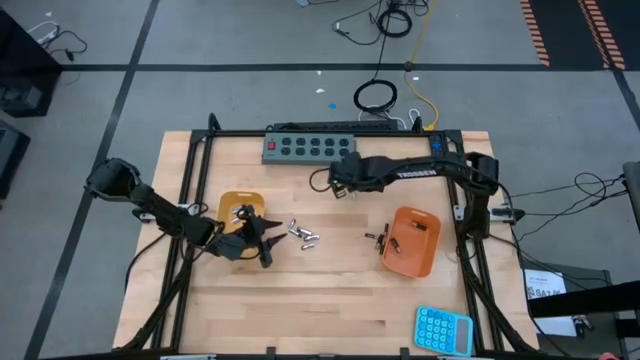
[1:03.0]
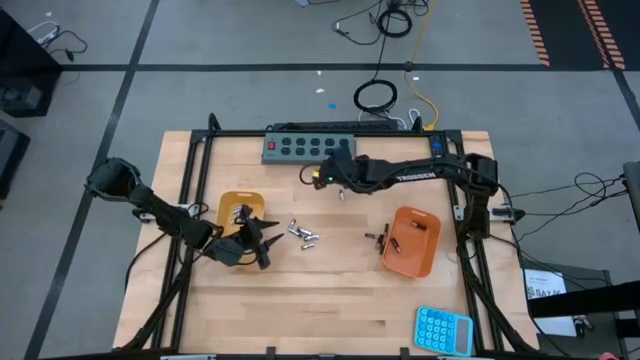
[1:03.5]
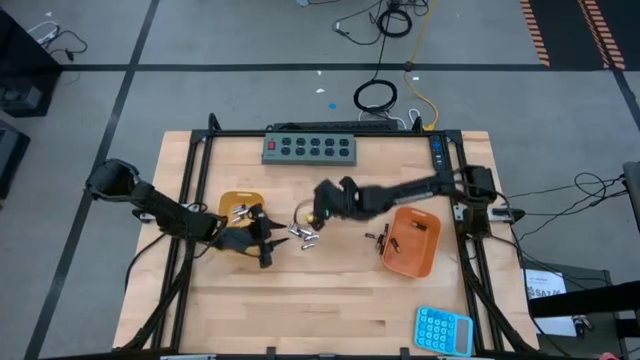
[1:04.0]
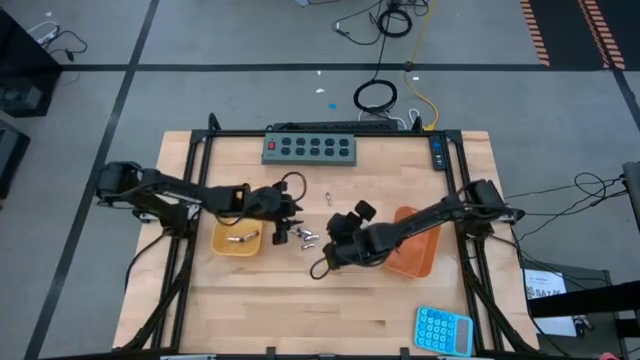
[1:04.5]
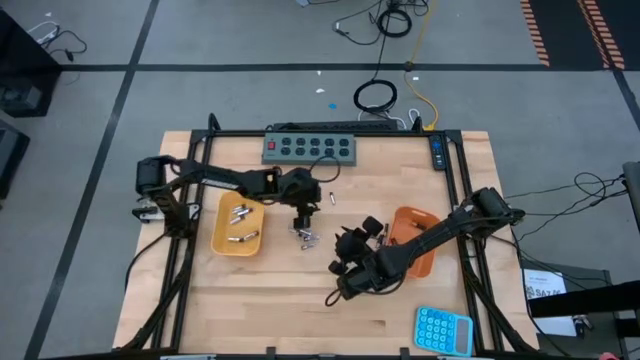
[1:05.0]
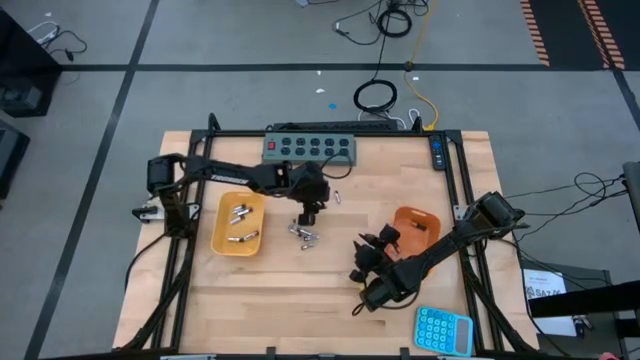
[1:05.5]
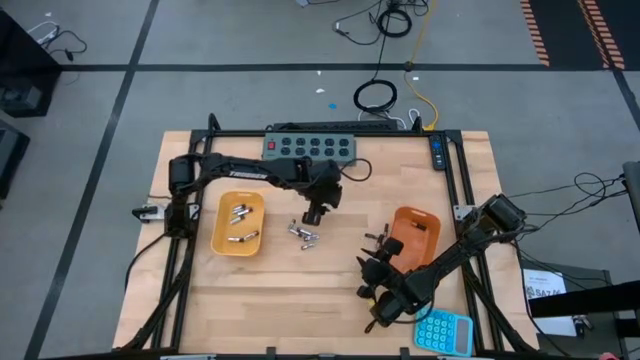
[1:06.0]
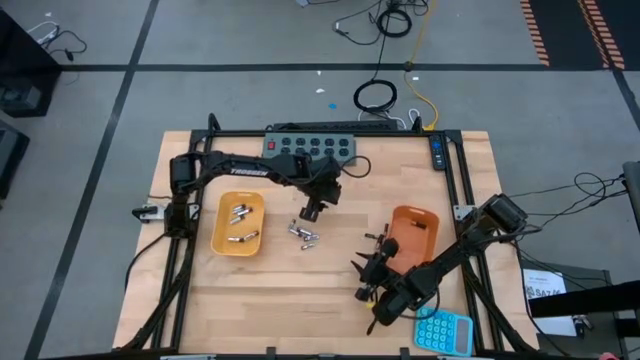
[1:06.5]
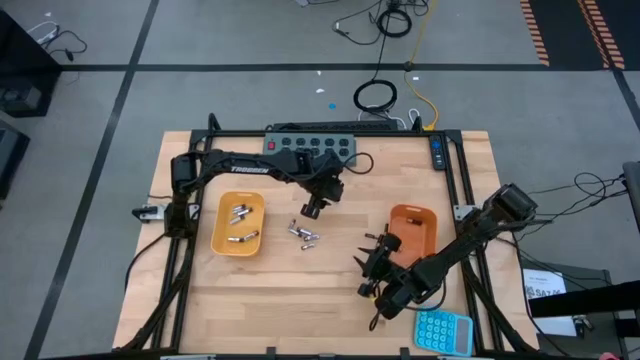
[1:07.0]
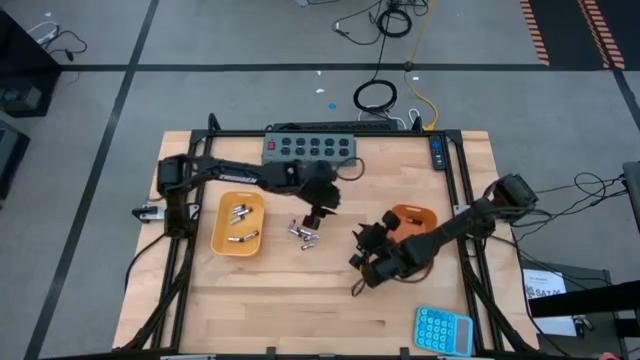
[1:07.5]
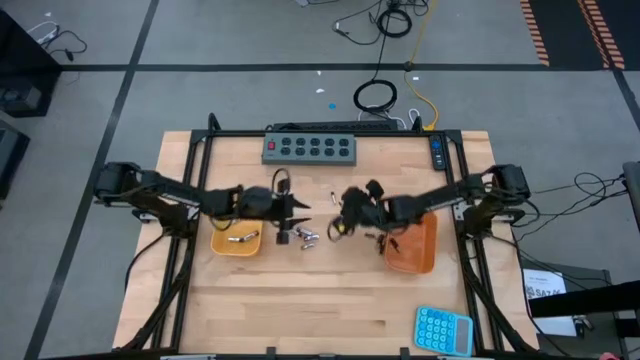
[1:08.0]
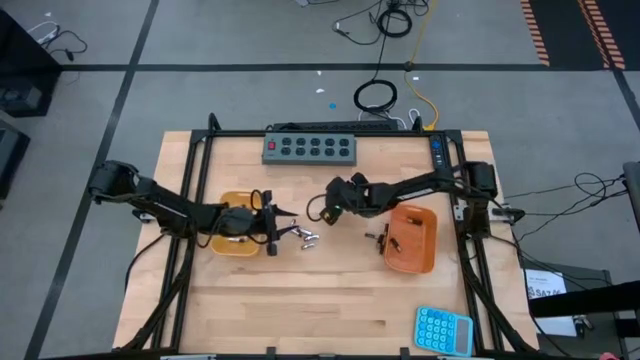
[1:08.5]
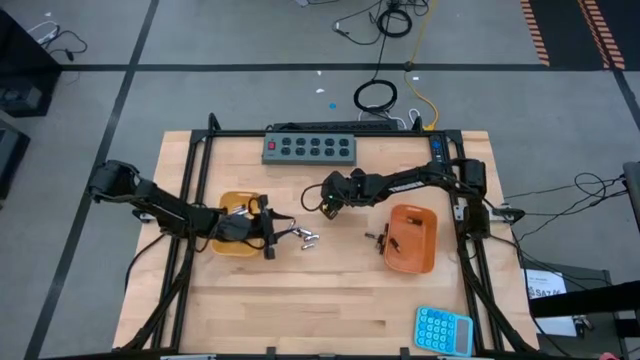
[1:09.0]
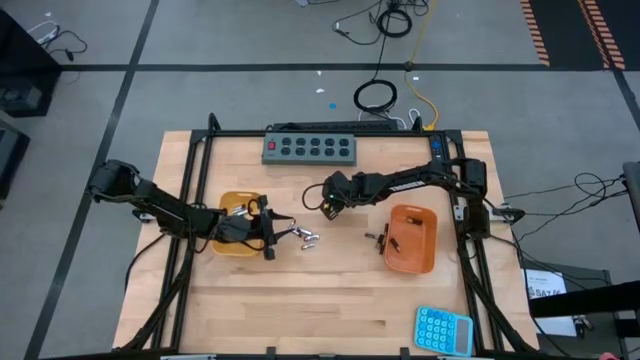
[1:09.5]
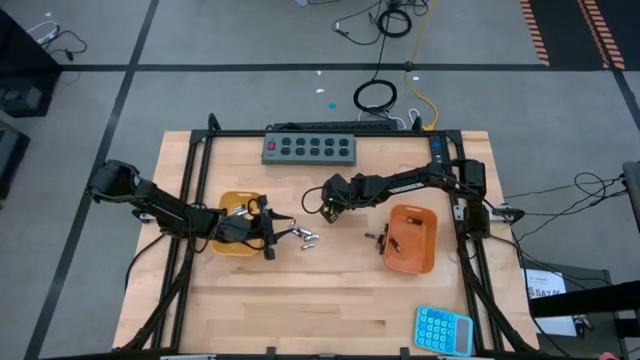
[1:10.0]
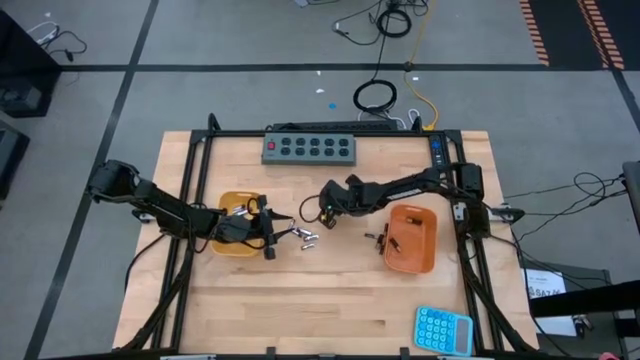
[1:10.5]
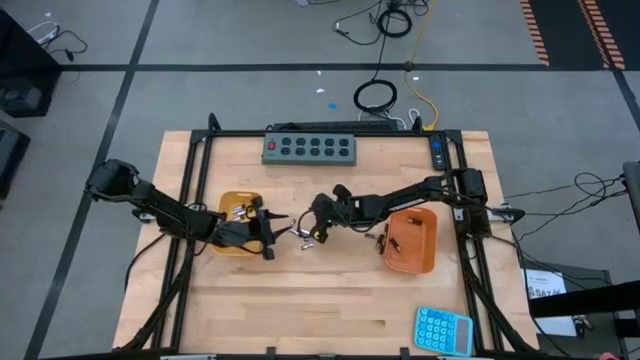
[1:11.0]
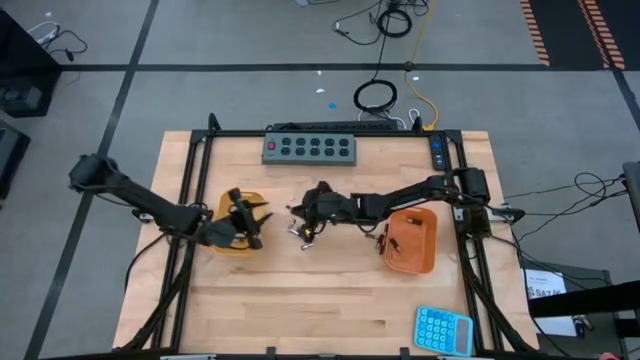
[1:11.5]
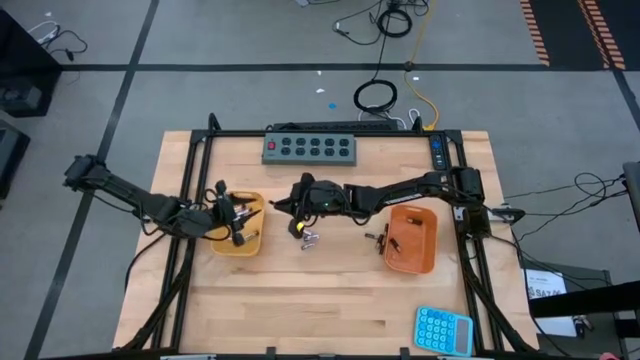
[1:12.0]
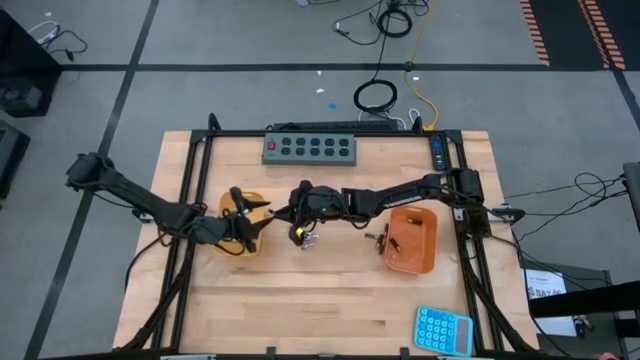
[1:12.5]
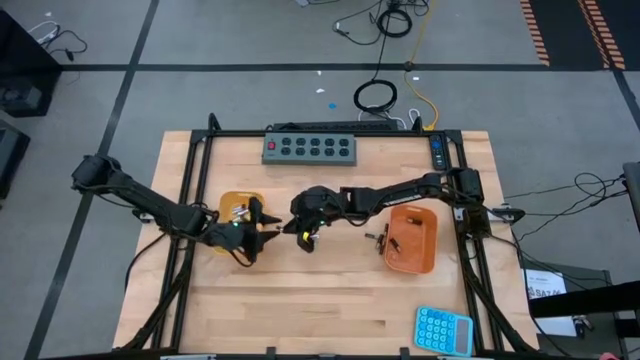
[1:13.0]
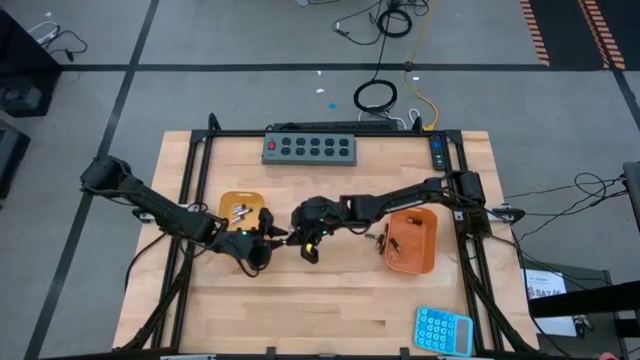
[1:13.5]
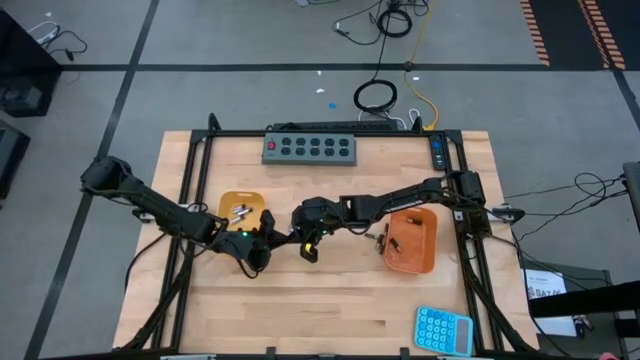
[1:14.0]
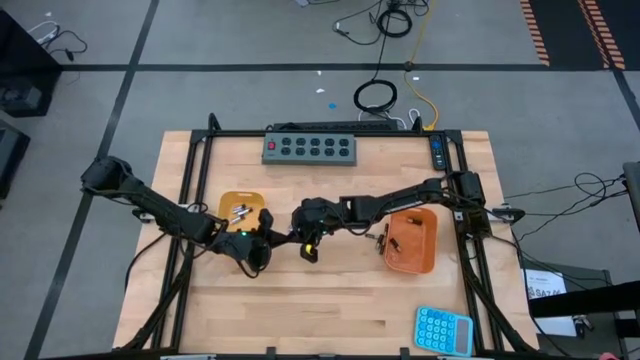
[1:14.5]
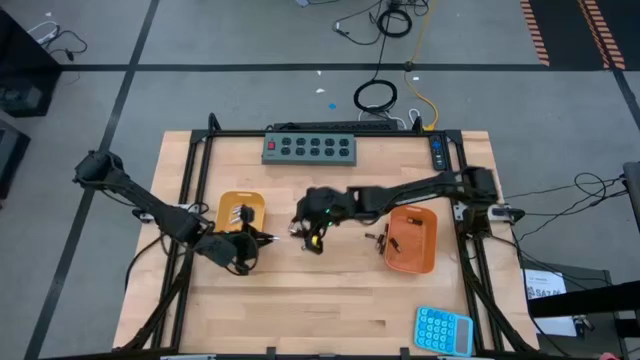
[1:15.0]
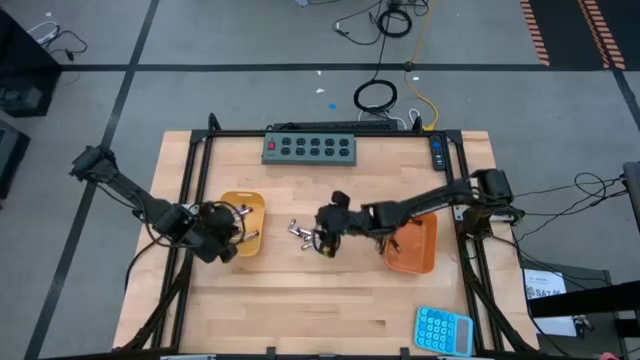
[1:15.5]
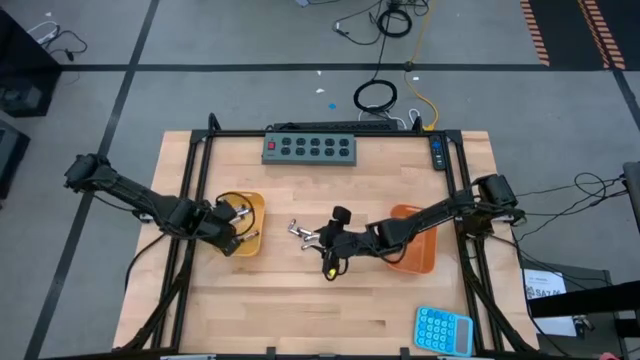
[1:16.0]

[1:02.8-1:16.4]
Task: Sort batteries
Put the silver battery into the yellow bin

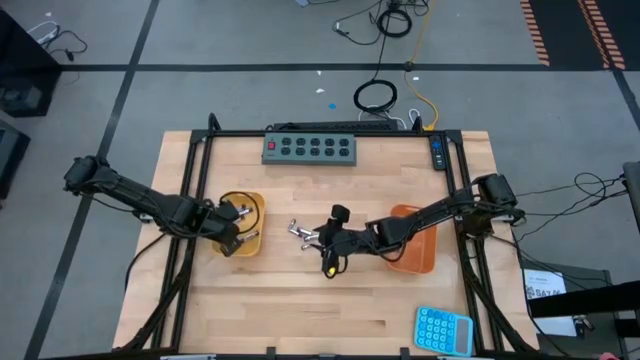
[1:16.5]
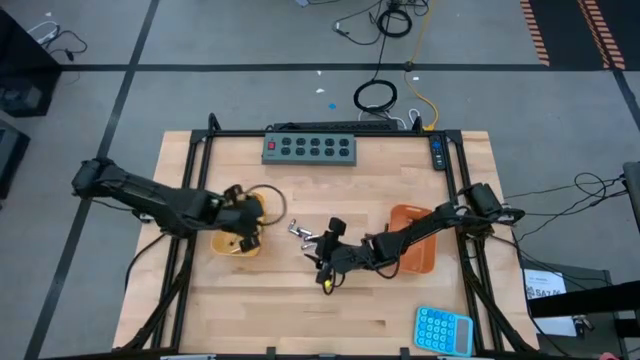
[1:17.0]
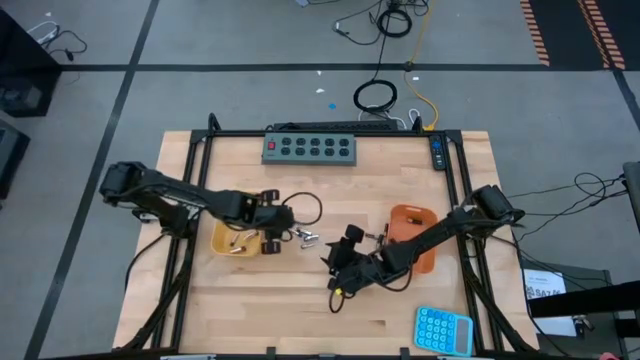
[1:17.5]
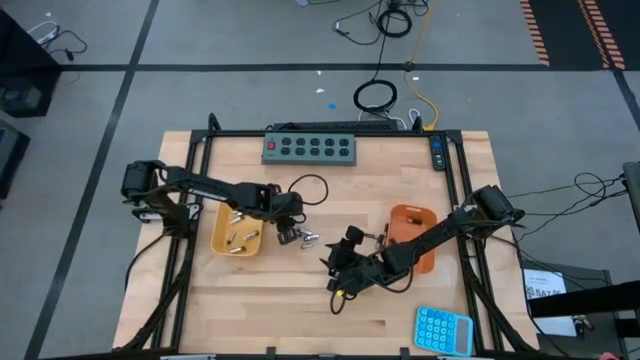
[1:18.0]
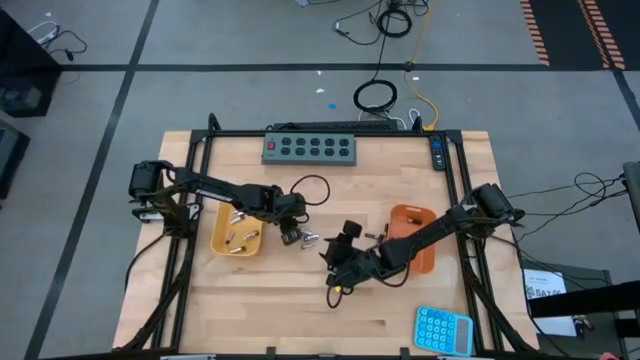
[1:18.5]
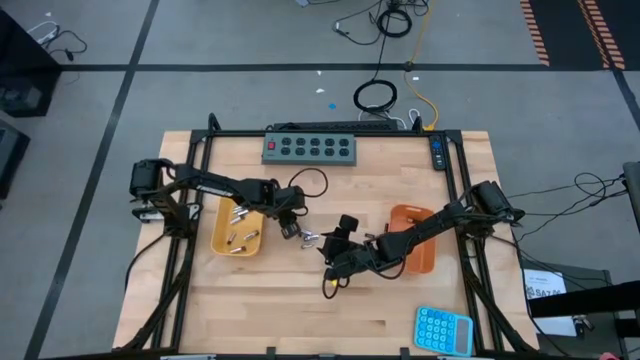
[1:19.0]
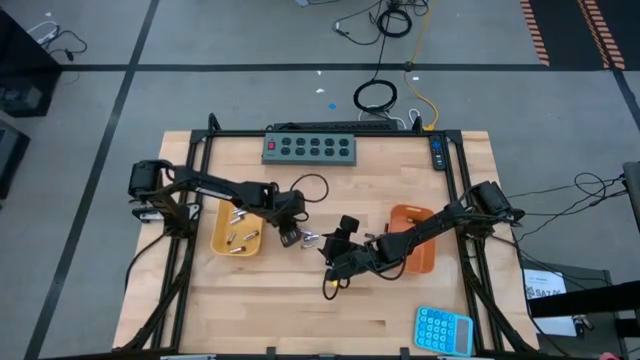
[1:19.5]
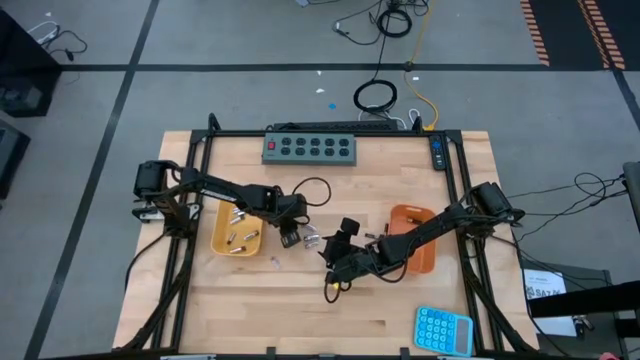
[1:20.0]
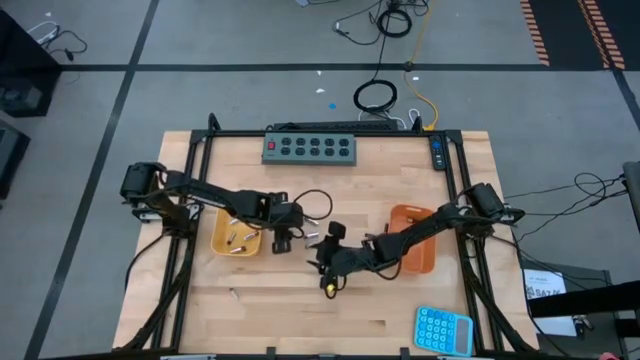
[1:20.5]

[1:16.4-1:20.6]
Put the silver battery into the yellow bin

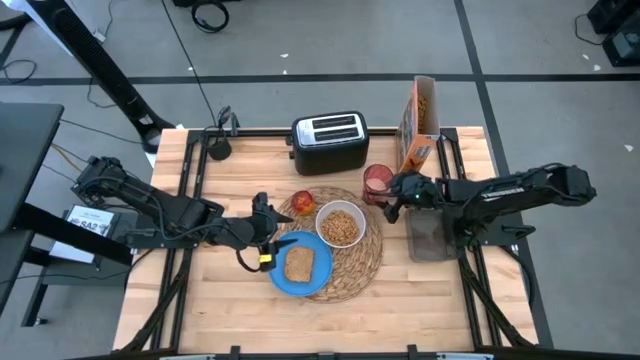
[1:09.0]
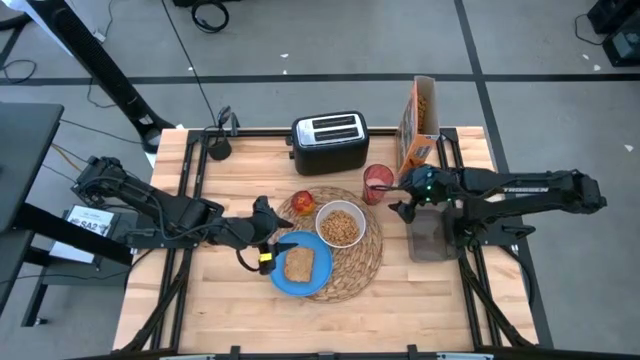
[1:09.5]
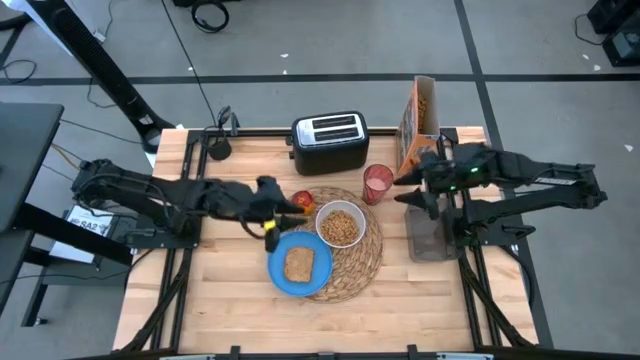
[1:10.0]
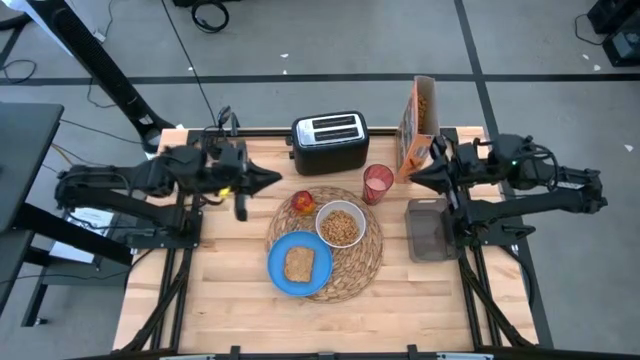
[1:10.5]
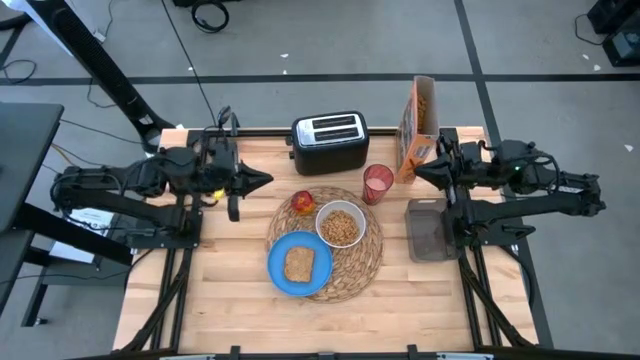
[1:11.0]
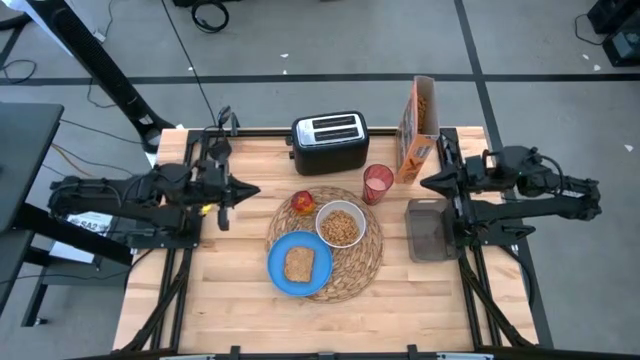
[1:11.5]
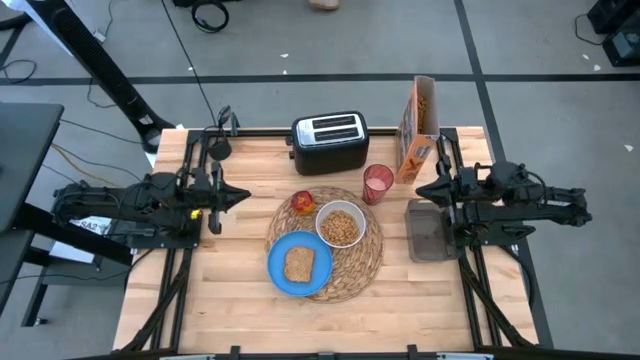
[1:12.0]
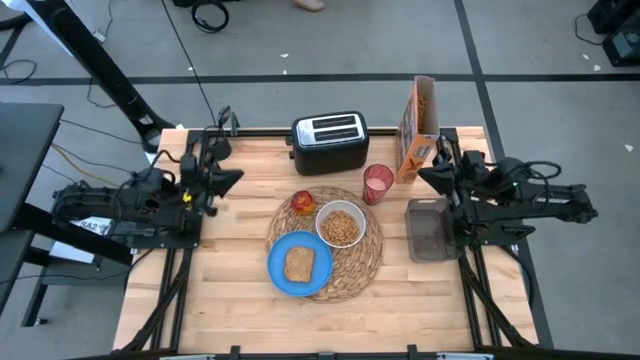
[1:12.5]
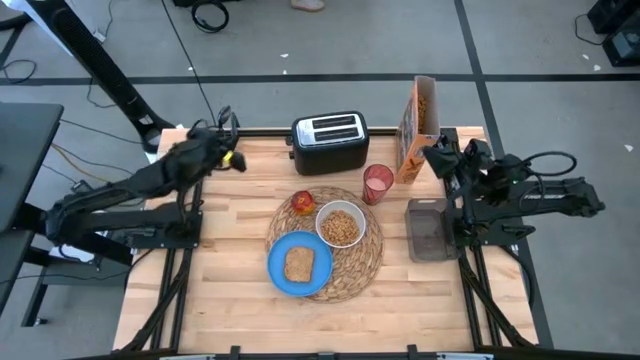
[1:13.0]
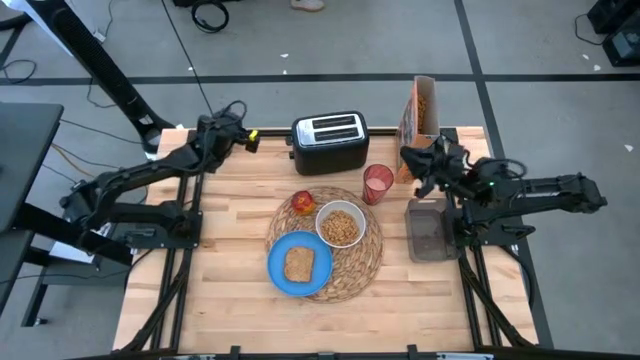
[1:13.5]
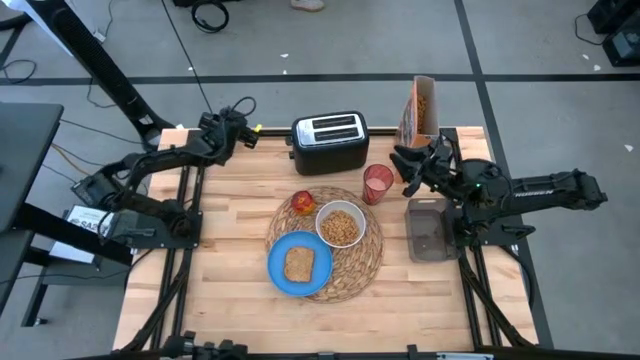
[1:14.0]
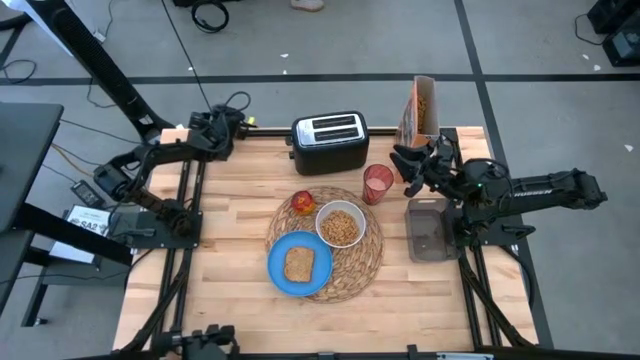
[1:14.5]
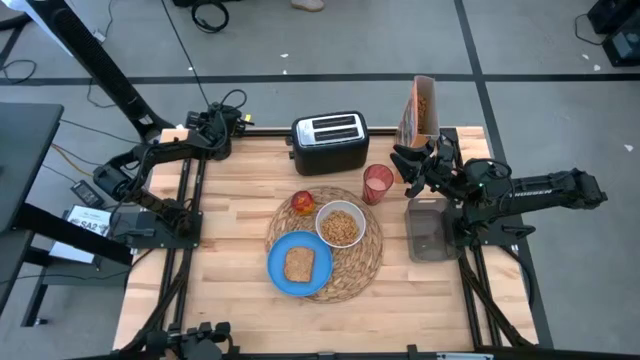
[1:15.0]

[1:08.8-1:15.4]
Task: Arrange a breakfast setting
Put the black spoon on top of the brown table mat to the right of the white bowl
